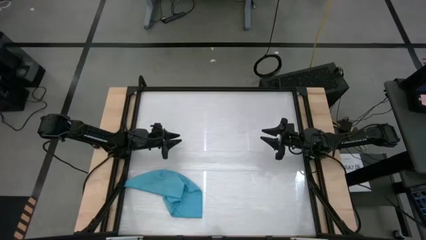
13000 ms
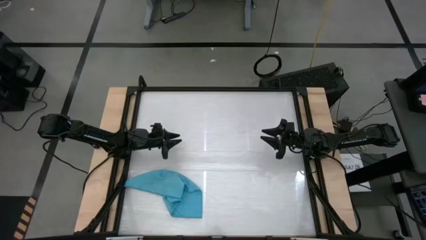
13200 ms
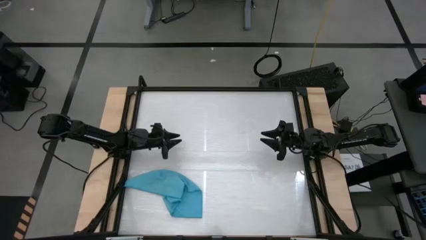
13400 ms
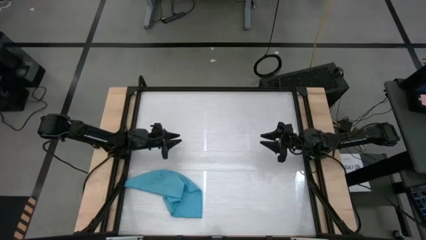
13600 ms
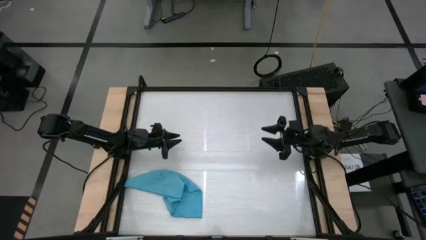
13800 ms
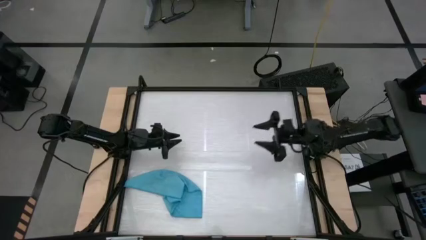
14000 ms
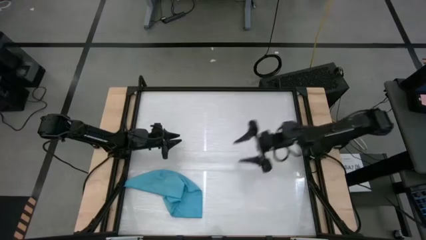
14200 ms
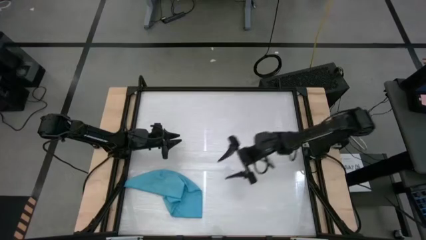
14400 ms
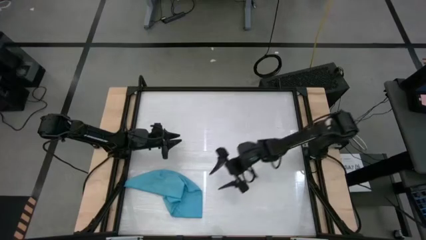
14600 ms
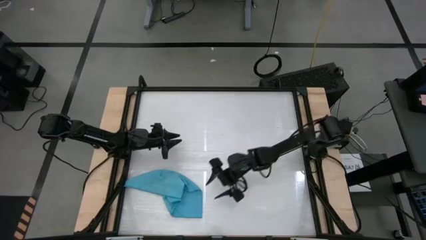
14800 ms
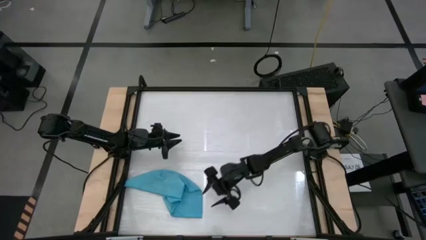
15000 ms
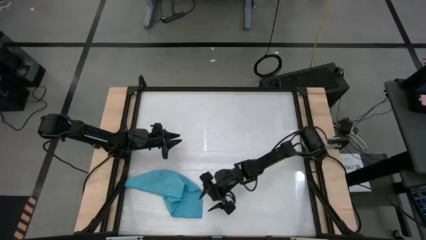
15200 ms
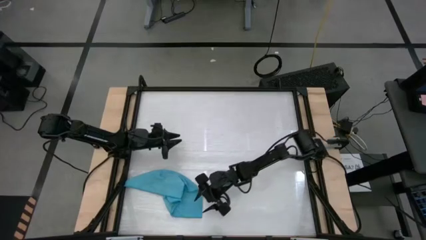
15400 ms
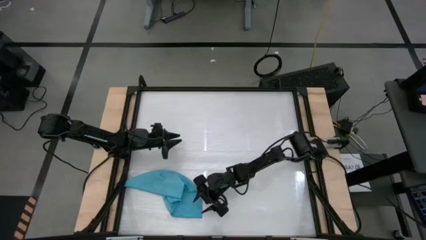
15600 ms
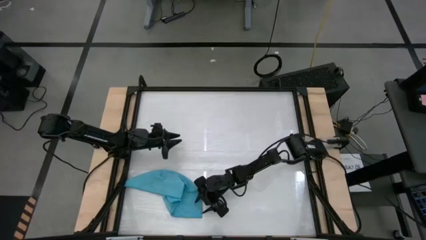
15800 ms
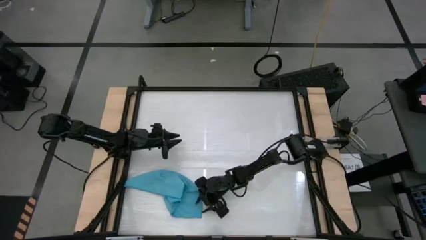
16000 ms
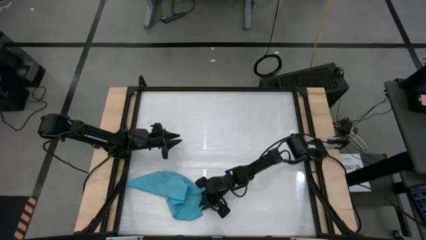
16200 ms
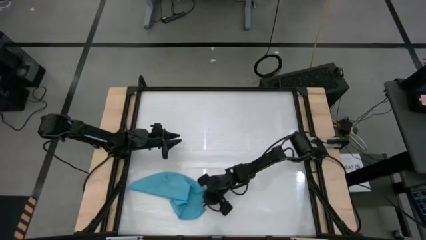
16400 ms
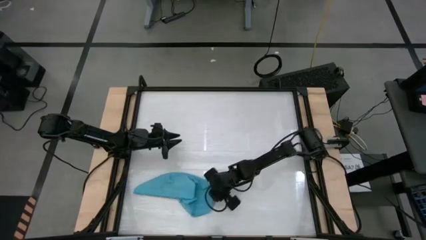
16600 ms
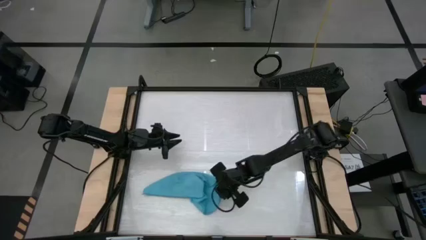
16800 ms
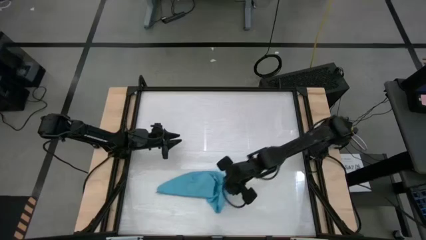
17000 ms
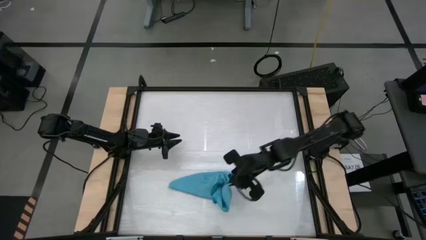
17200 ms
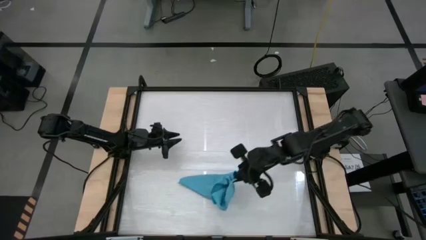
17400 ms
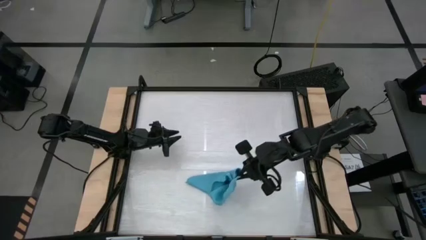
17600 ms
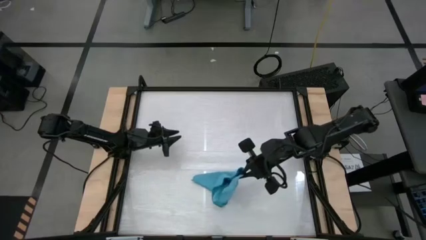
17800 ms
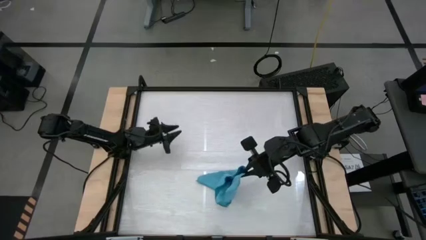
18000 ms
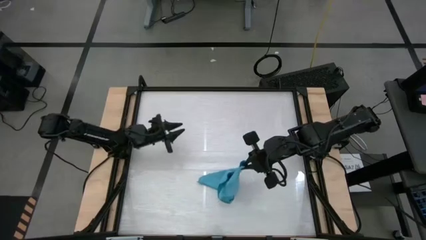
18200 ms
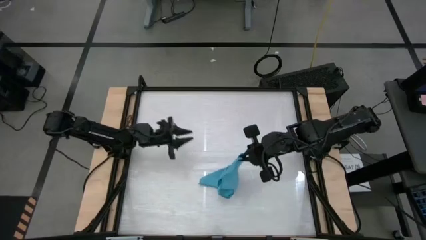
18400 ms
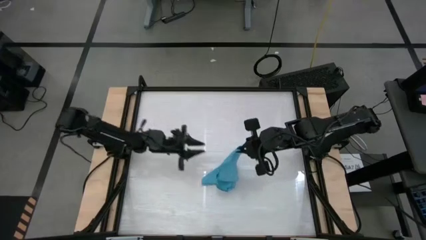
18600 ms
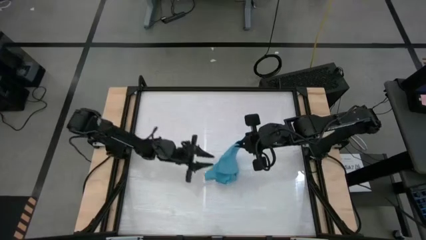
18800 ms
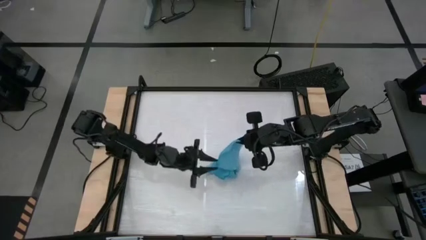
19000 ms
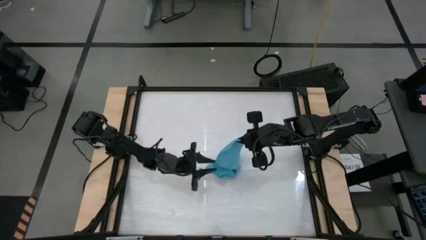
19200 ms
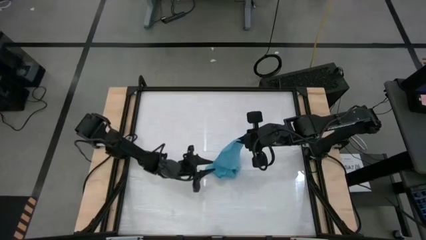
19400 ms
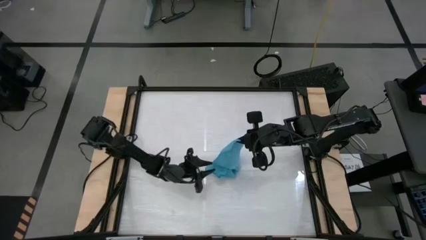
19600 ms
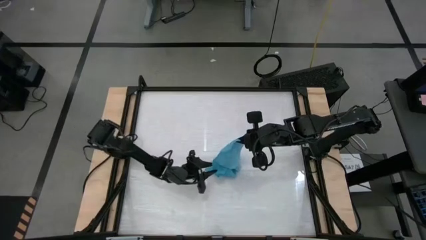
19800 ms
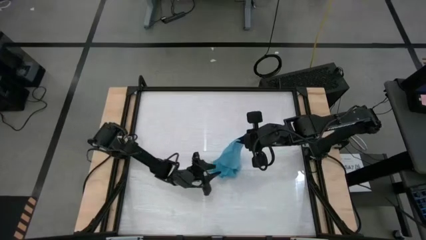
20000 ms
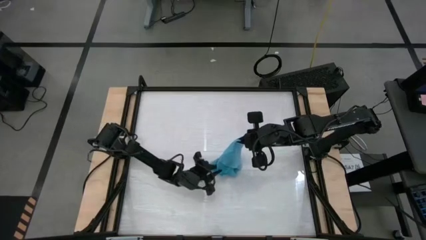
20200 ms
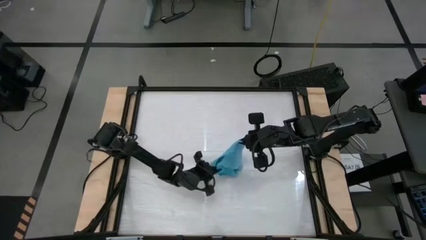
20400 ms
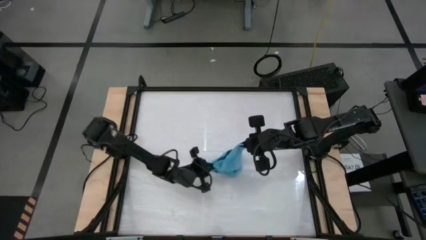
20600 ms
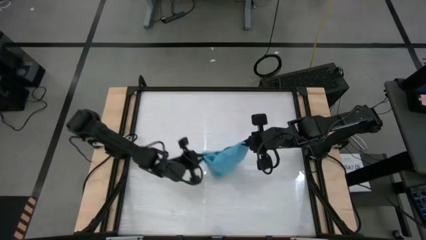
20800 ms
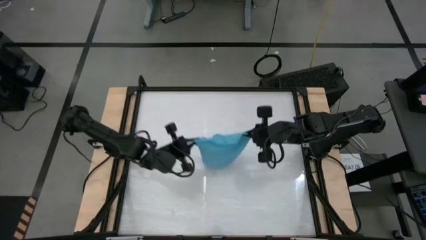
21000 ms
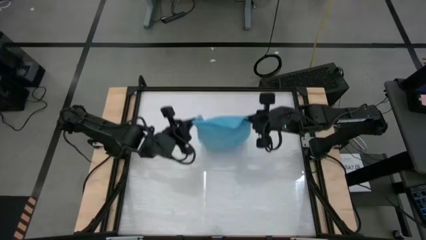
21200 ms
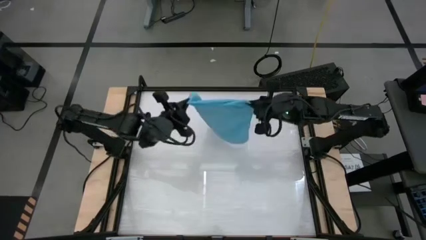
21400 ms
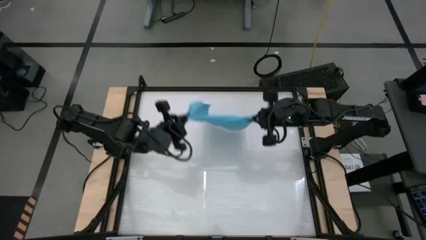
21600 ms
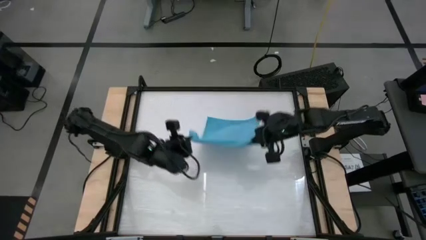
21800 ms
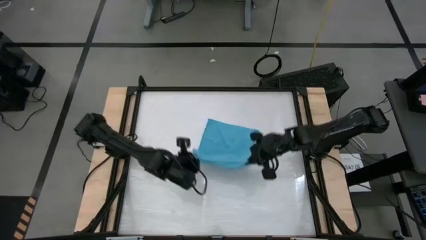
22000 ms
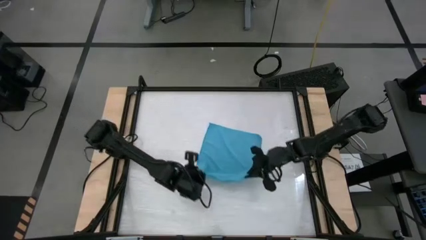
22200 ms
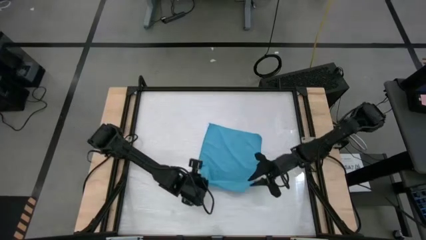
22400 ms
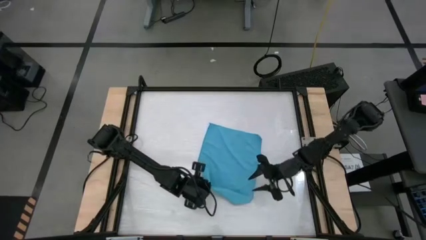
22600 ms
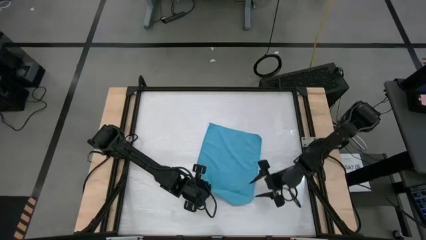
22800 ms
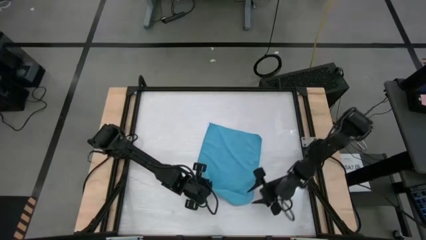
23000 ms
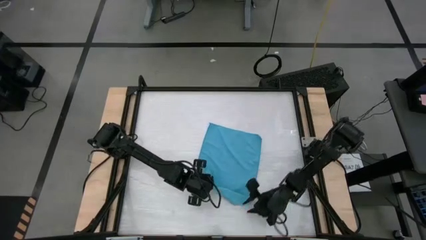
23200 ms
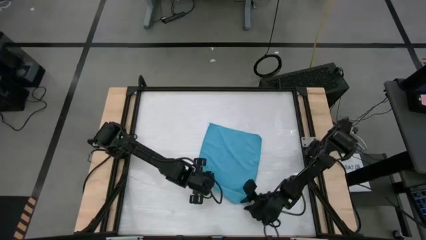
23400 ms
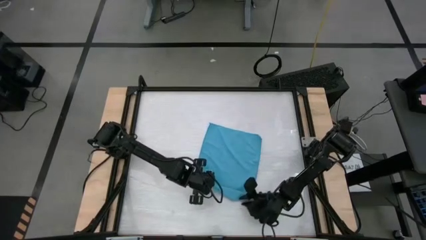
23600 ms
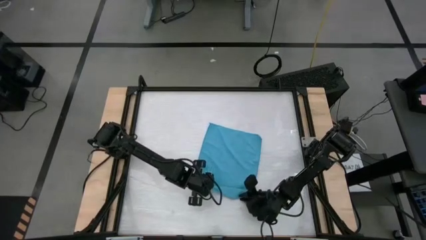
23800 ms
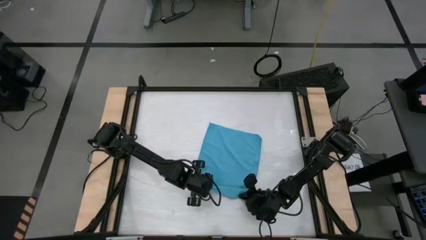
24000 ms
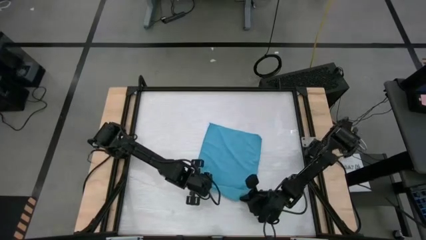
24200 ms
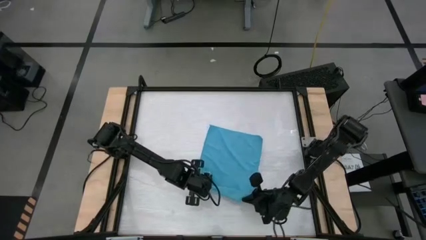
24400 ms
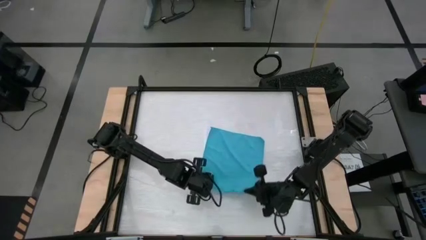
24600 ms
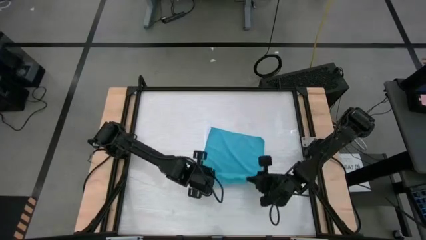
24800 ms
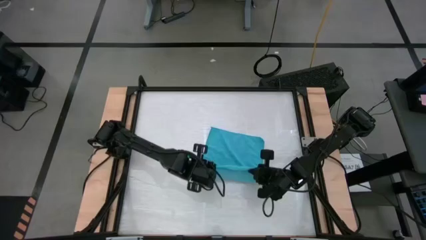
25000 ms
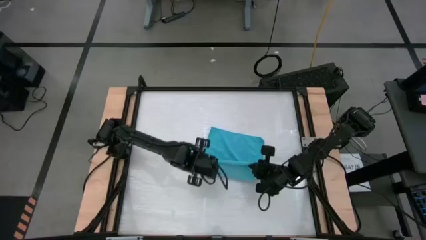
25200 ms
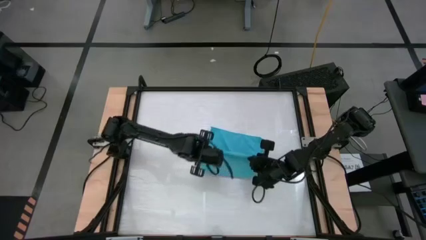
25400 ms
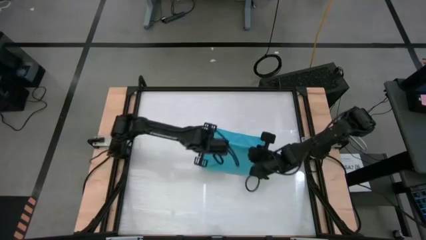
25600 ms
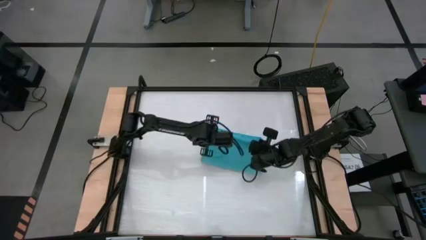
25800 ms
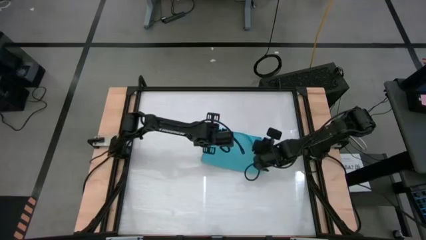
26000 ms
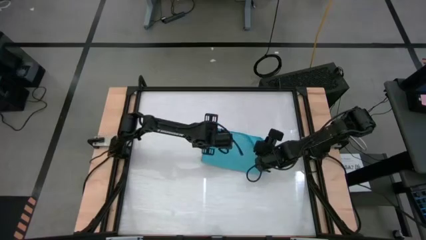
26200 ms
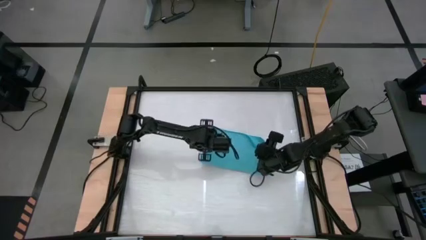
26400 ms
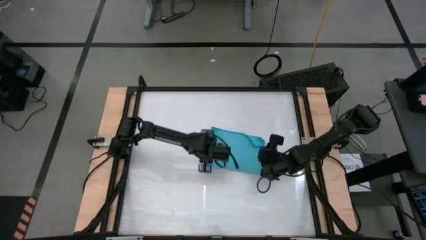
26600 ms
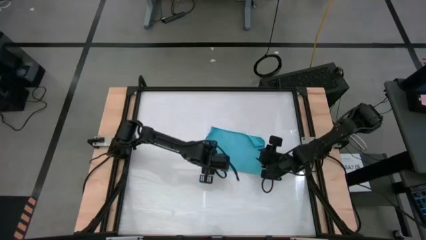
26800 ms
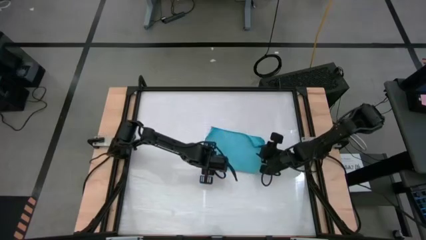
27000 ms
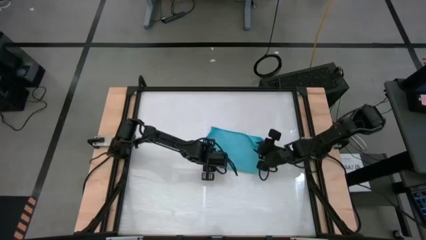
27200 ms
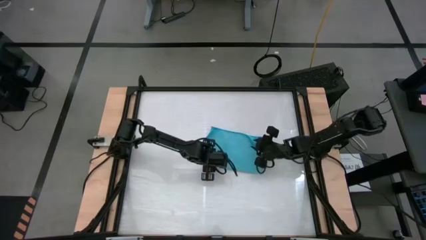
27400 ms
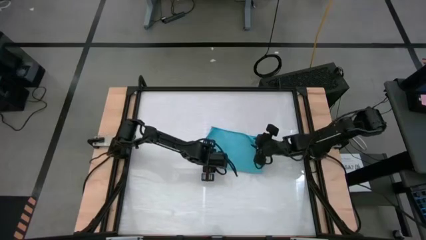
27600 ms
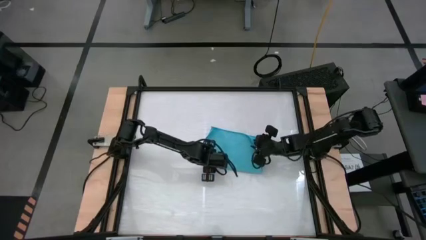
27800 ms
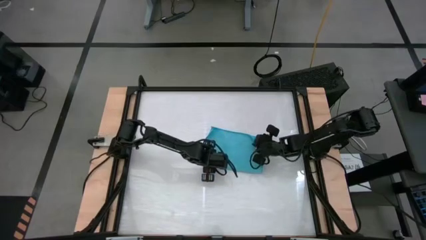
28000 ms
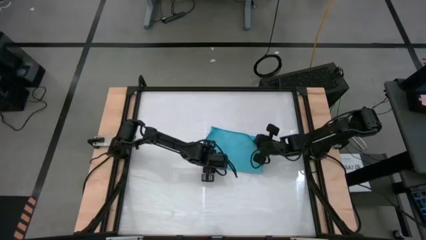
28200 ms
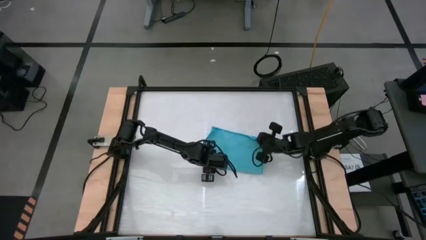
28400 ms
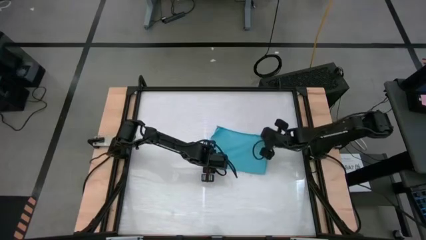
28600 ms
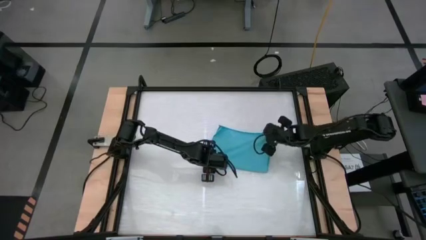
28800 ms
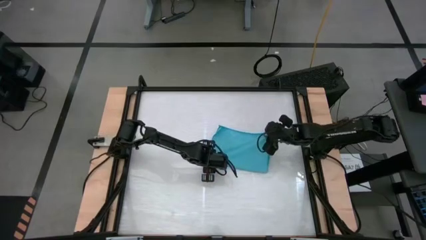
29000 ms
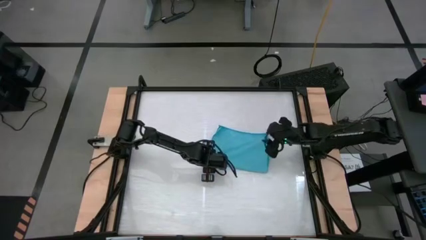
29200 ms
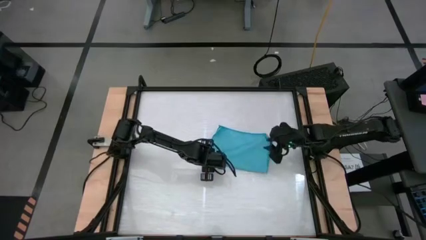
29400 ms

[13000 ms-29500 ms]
Task: Roll towel
Fold the light blue towel
